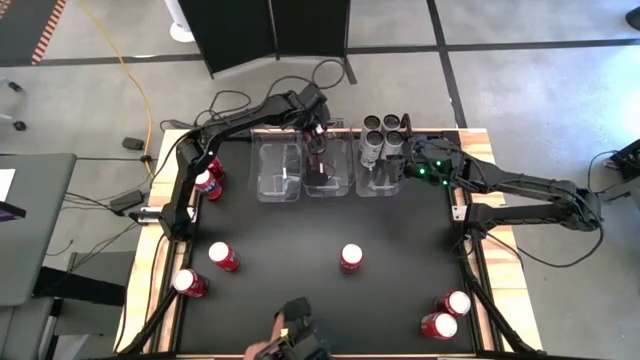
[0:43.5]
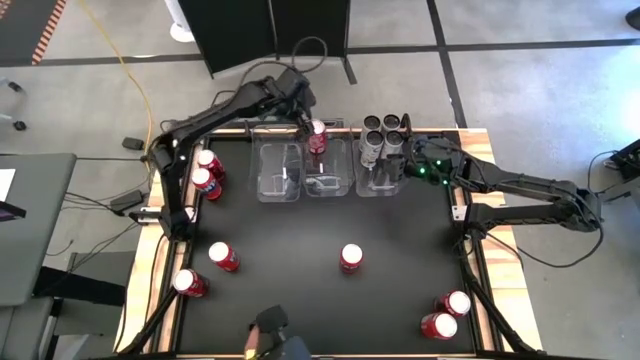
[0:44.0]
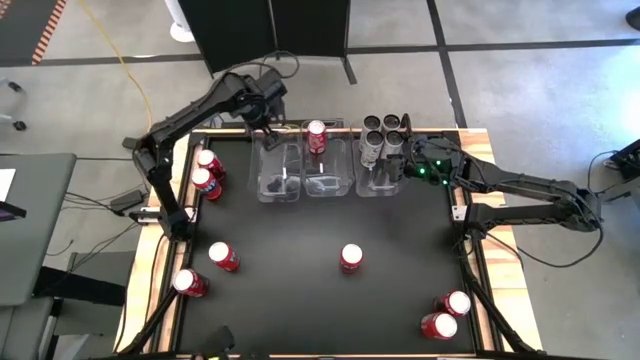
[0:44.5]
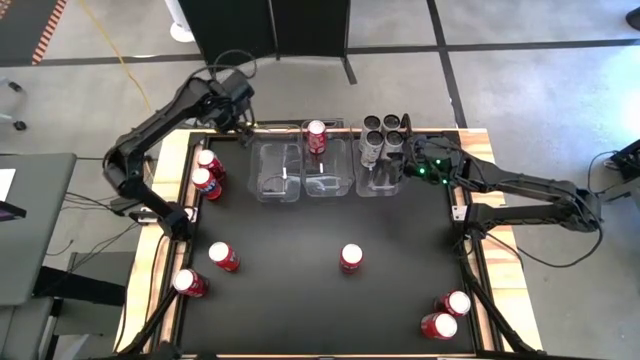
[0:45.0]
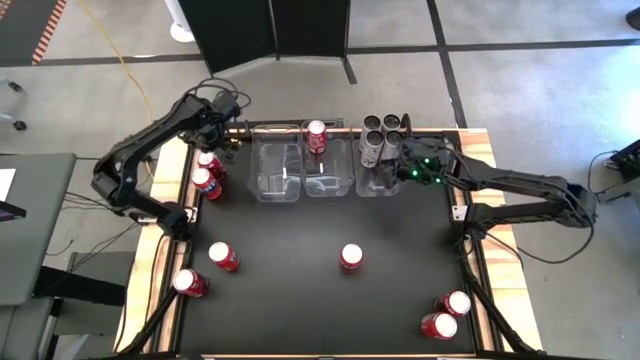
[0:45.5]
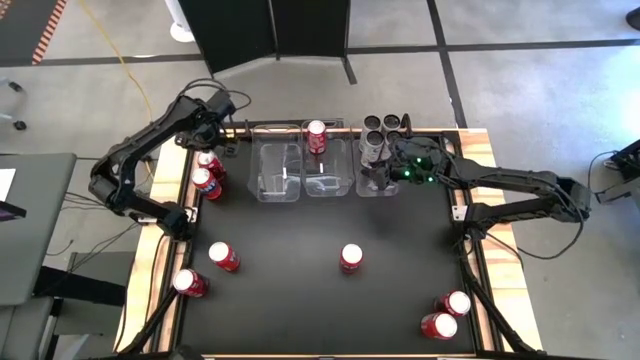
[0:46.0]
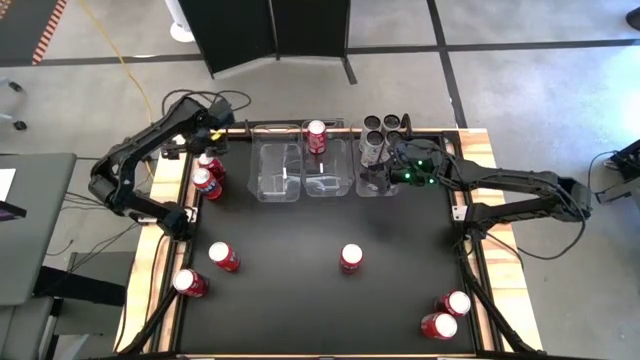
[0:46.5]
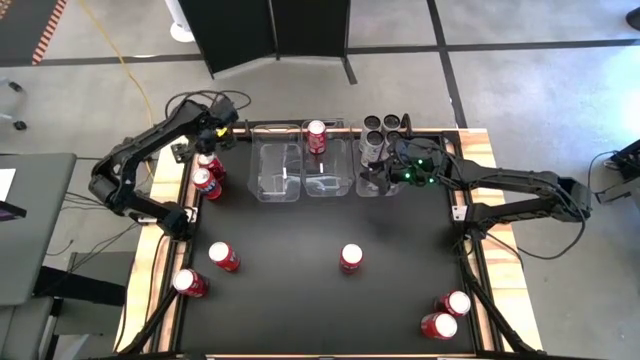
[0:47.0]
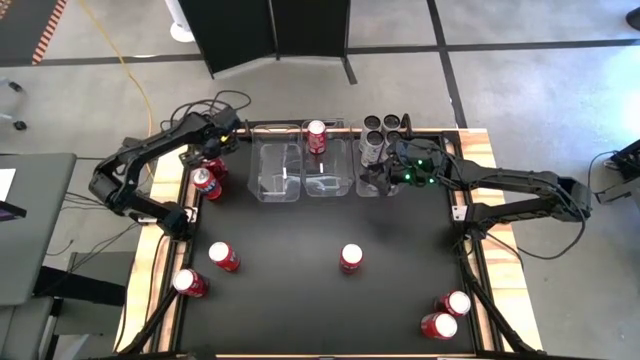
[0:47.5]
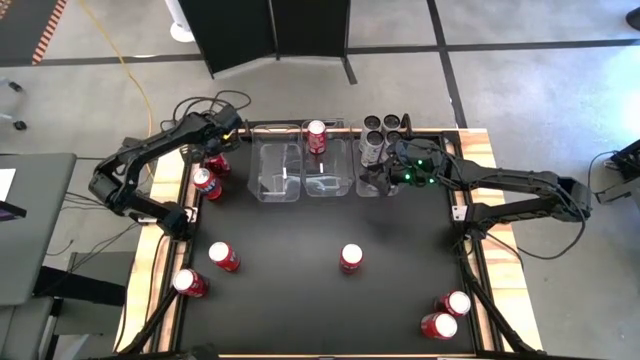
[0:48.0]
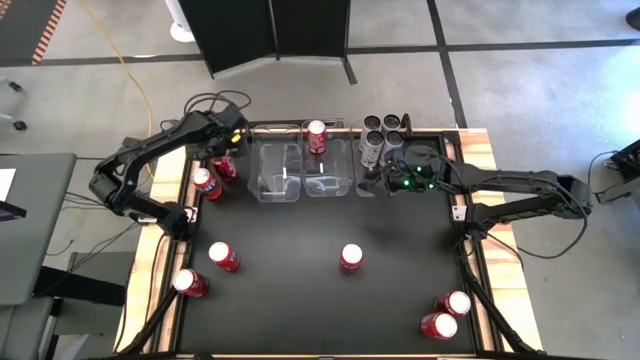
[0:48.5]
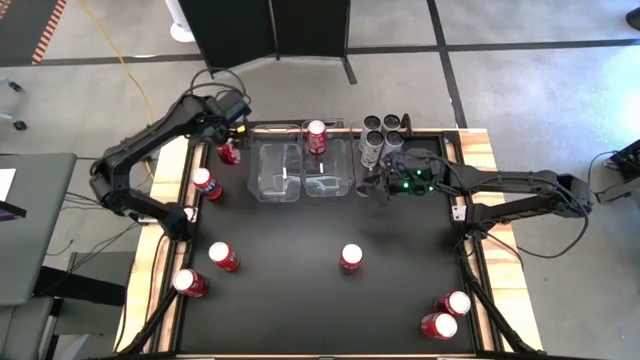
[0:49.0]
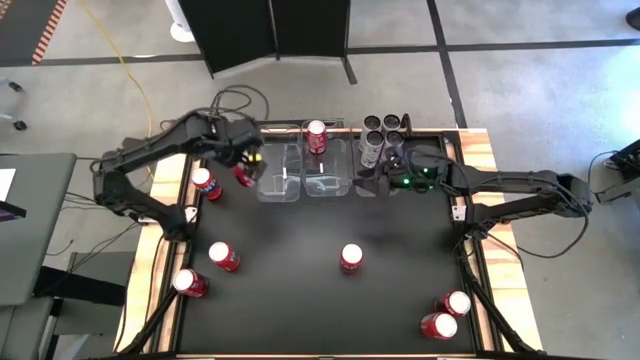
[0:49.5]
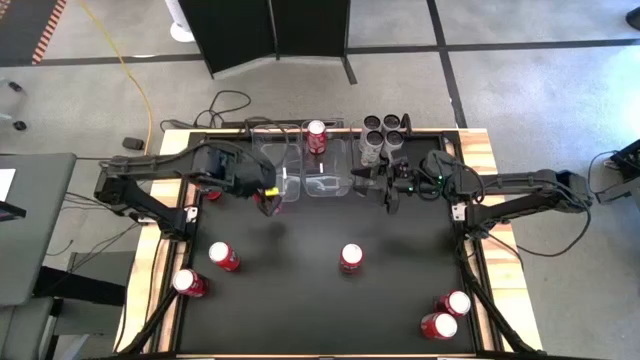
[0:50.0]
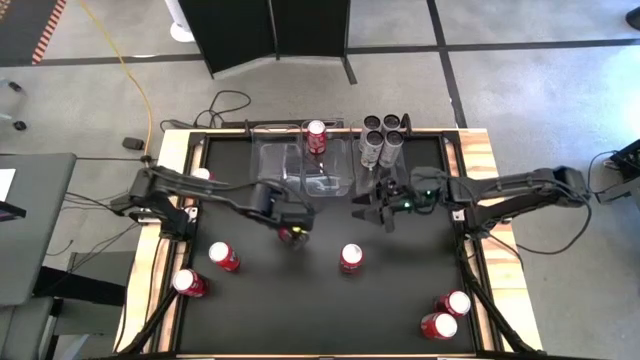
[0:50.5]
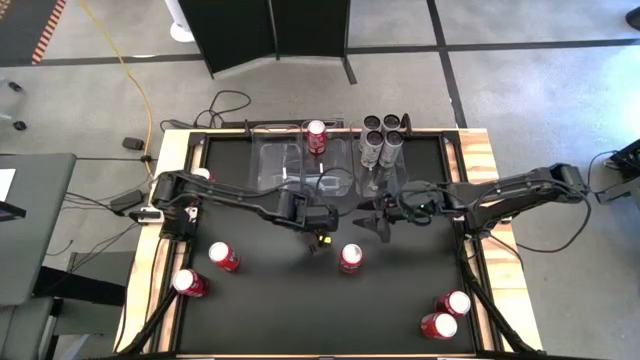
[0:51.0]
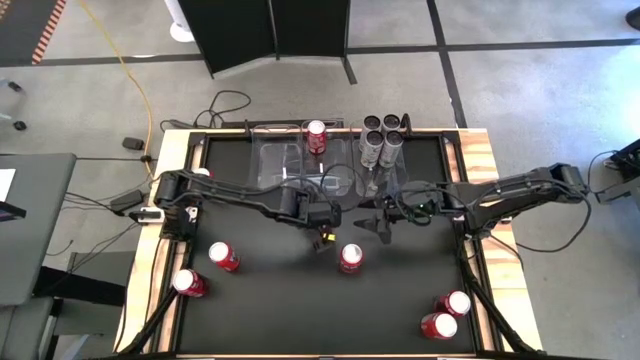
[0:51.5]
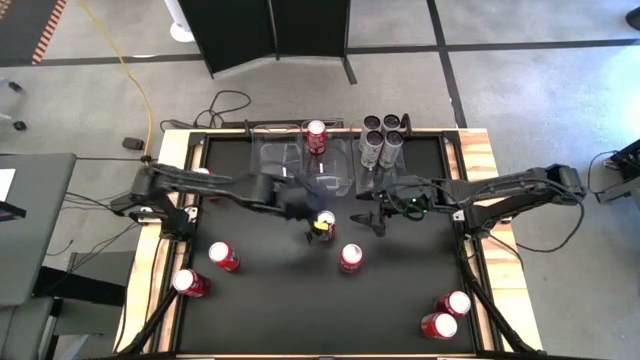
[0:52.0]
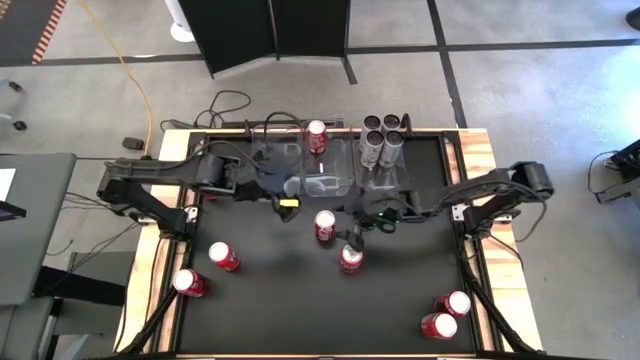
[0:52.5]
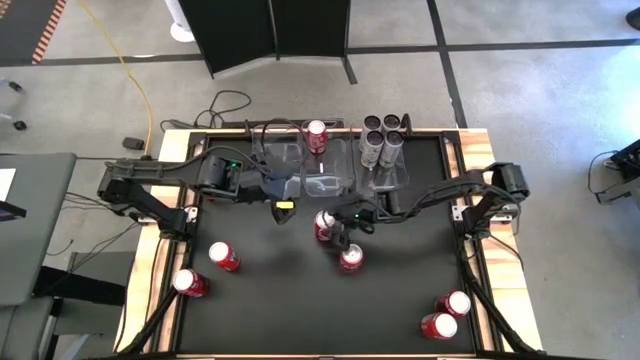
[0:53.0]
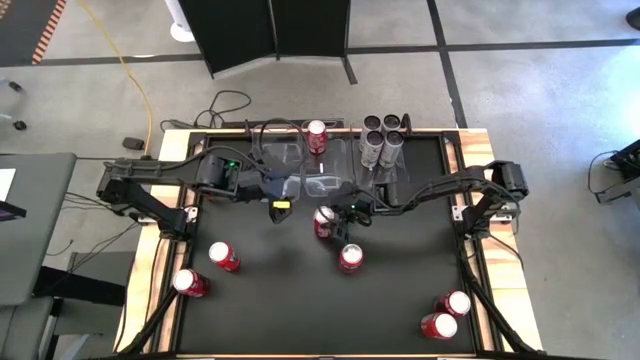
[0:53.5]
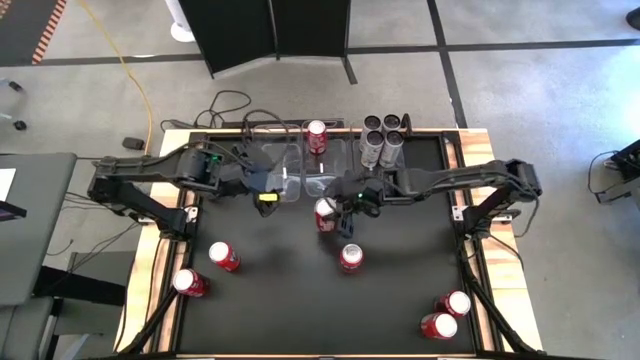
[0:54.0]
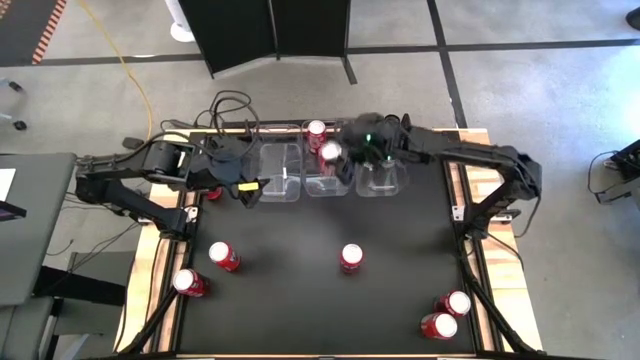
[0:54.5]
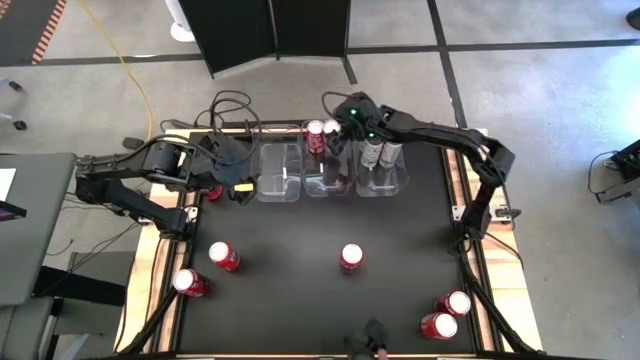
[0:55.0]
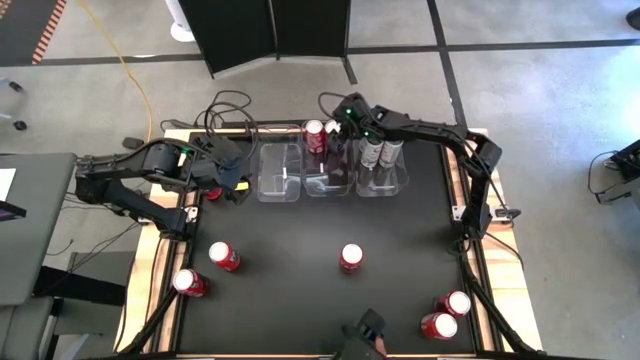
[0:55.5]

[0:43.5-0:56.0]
Task: Sort soda cans
Put the top red-white soda can into the center transparent bin

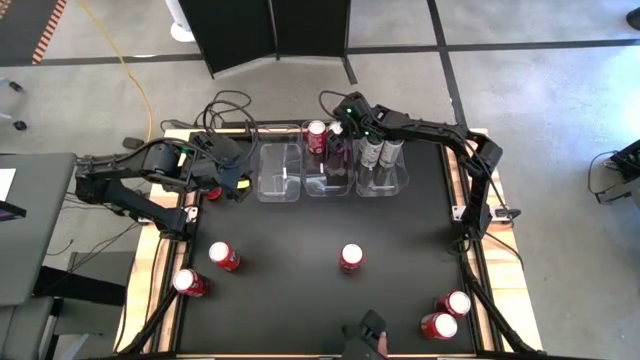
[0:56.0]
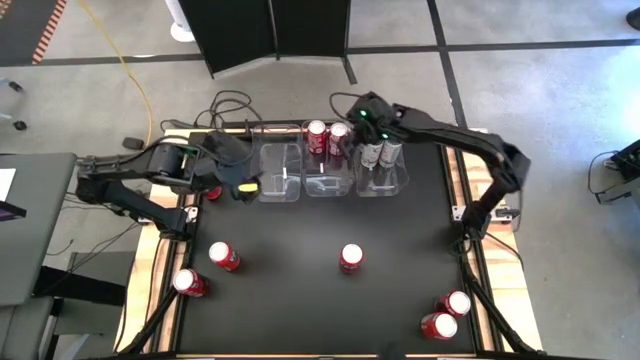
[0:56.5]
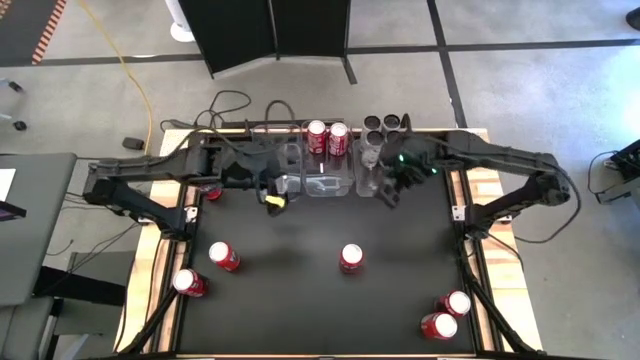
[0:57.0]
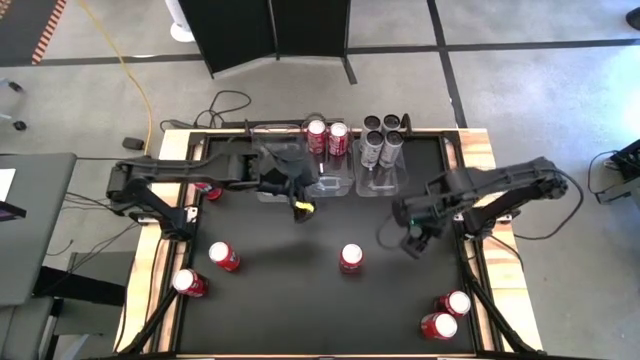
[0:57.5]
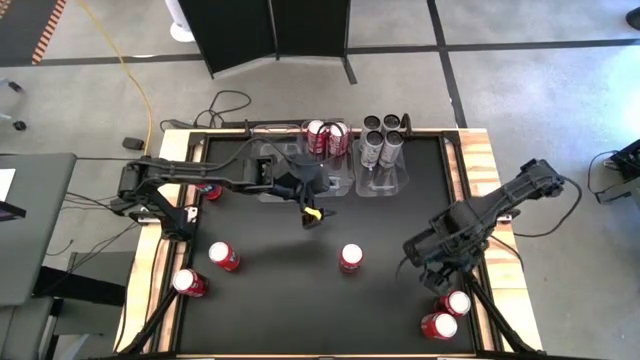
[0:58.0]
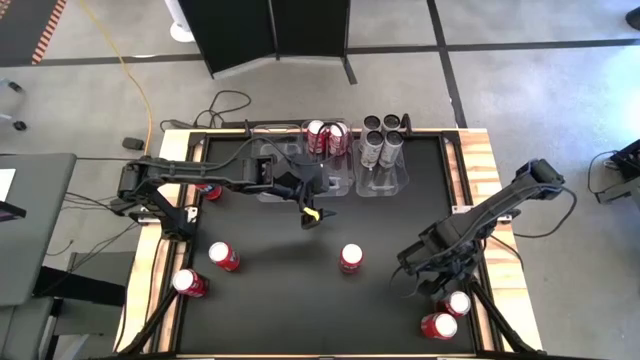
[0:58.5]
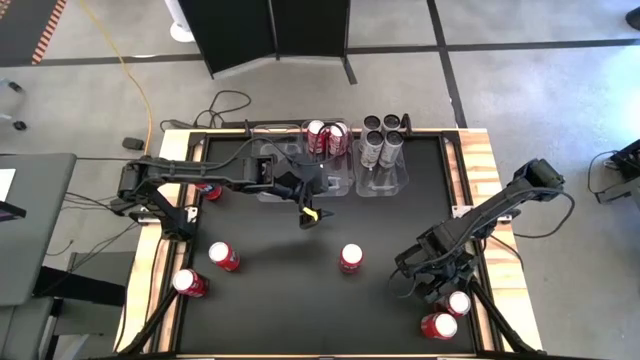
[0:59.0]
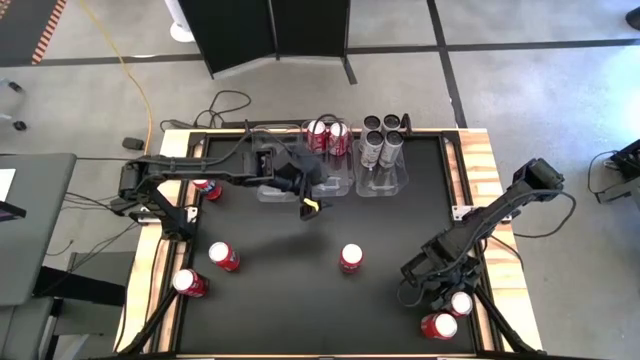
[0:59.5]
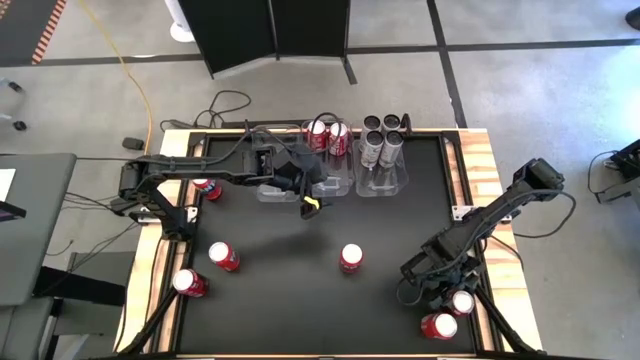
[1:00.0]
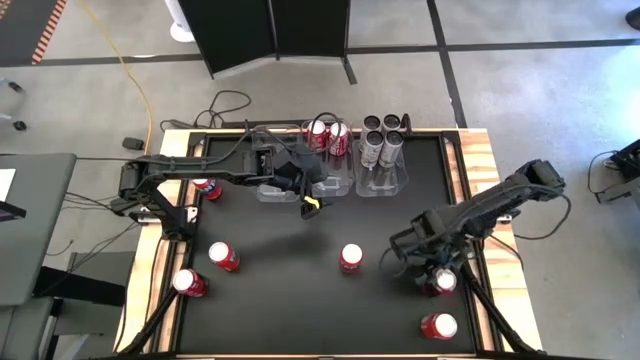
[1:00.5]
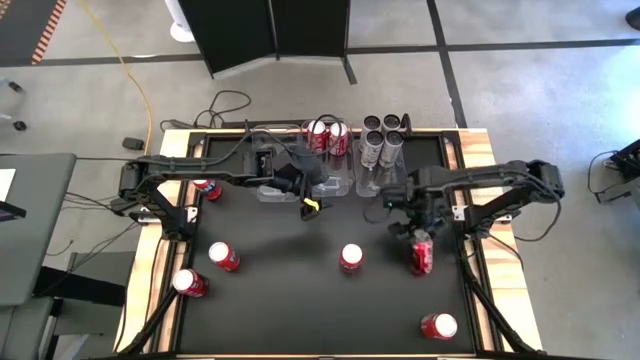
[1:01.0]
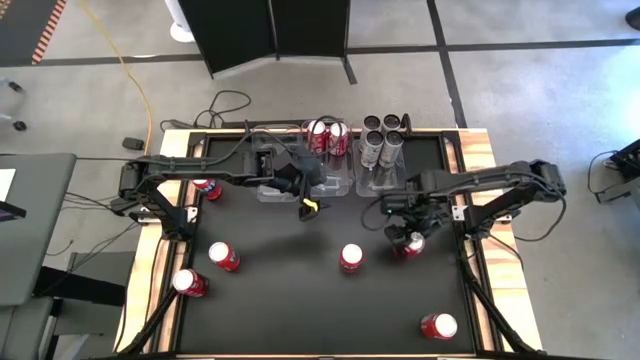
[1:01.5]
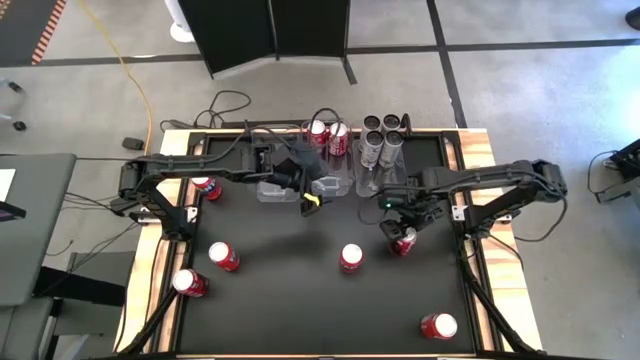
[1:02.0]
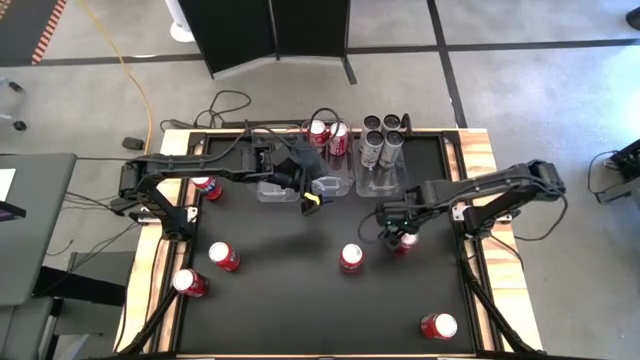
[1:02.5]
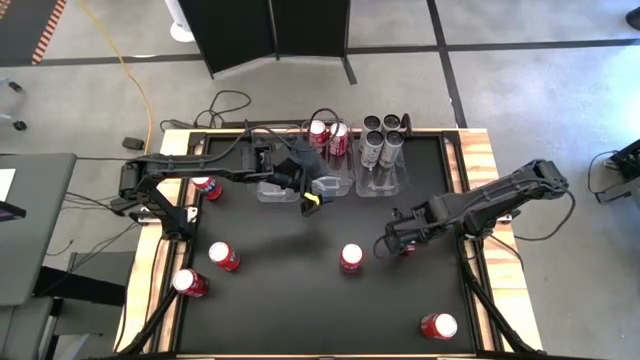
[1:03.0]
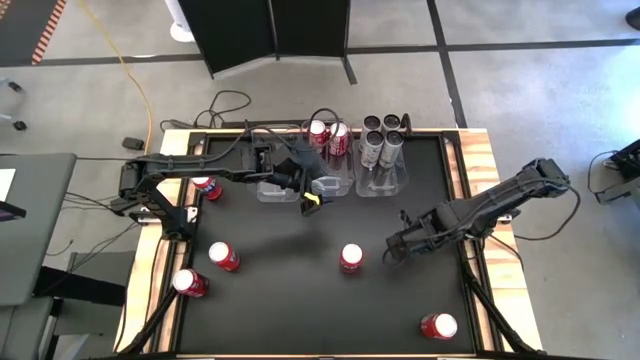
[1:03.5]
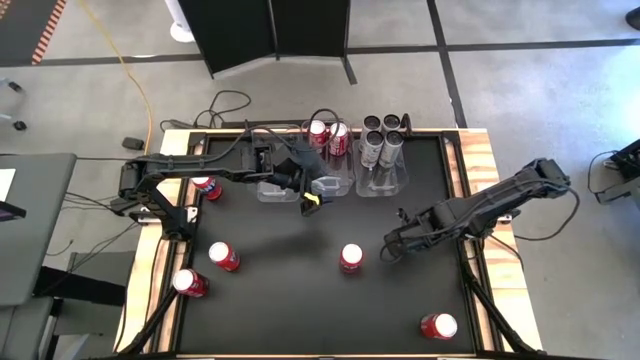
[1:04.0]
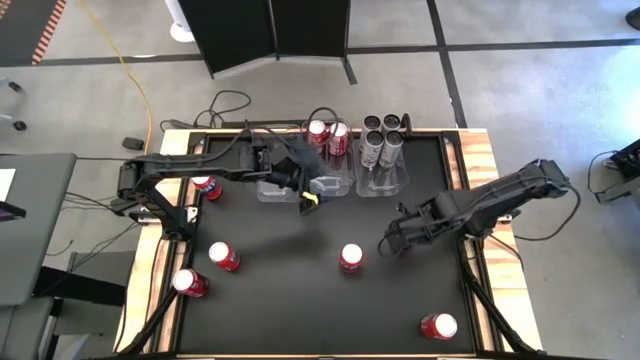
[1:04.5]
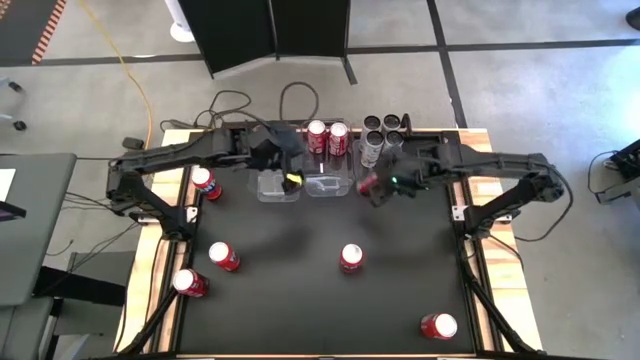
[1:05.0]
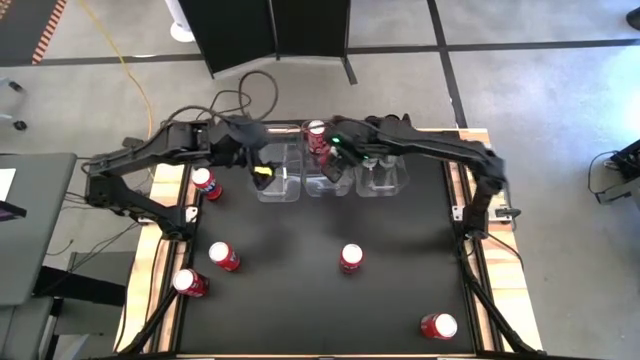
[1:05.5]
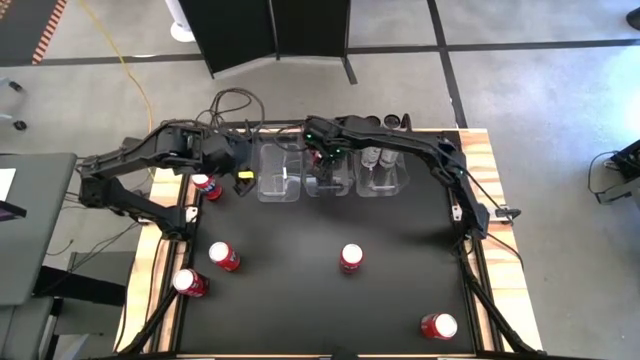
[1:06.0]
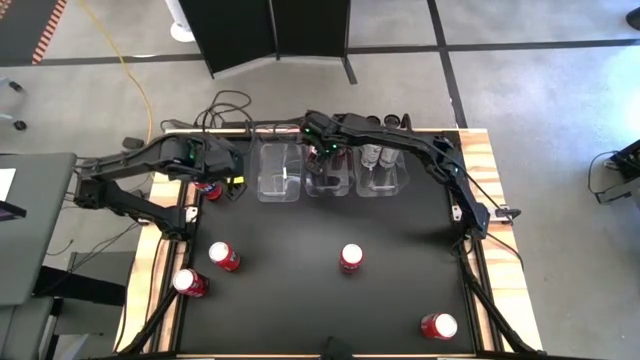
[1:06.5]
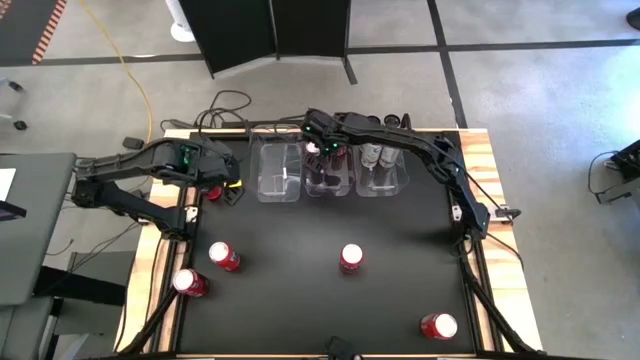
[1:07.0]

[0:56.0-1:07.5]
Put the right red-white soda can into the center transparent bin
